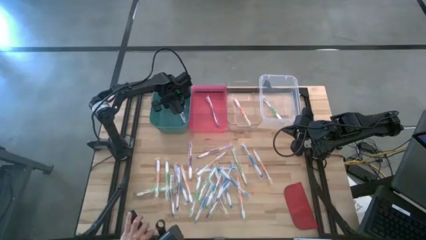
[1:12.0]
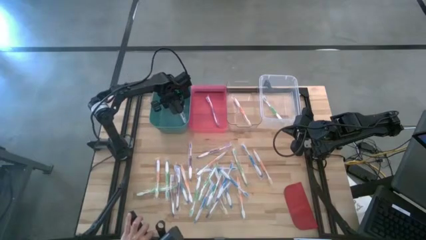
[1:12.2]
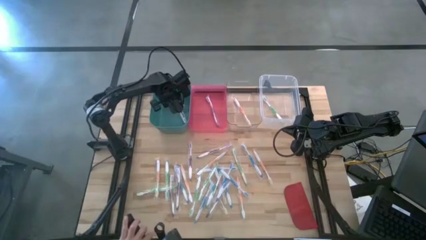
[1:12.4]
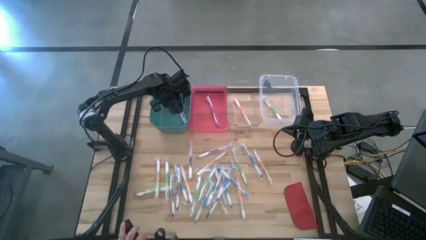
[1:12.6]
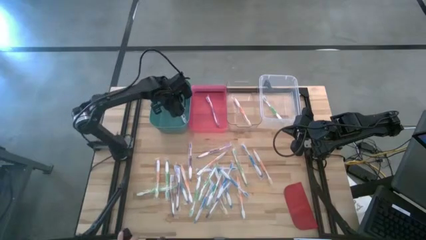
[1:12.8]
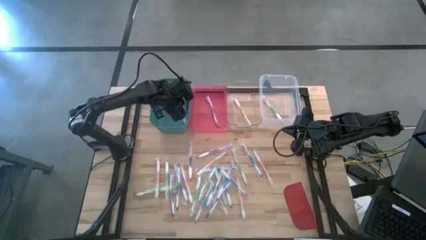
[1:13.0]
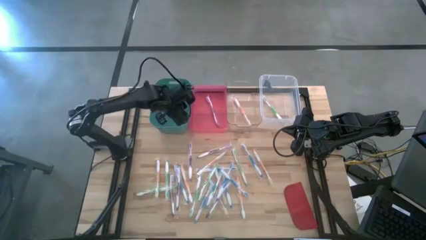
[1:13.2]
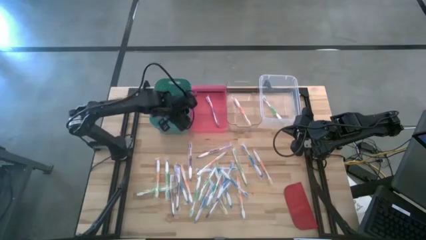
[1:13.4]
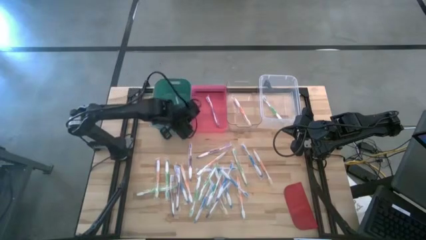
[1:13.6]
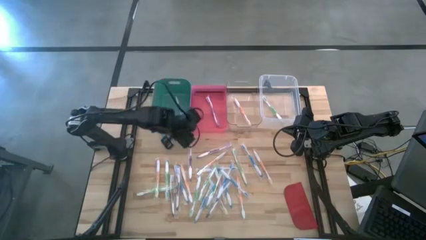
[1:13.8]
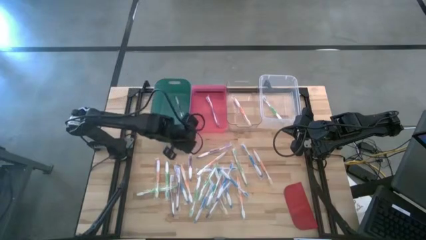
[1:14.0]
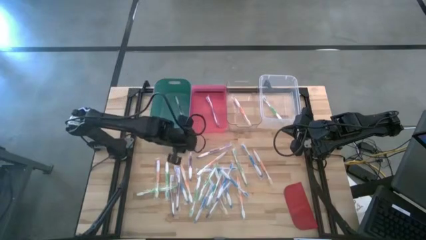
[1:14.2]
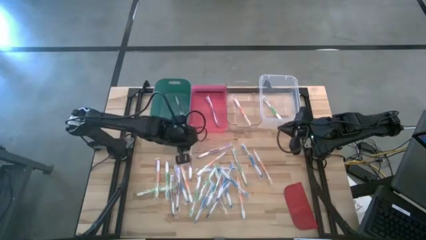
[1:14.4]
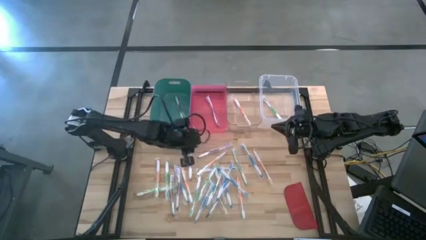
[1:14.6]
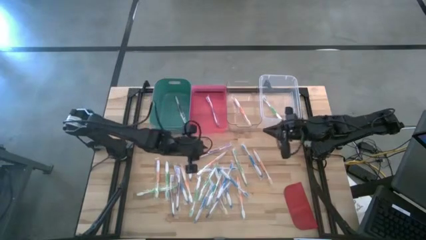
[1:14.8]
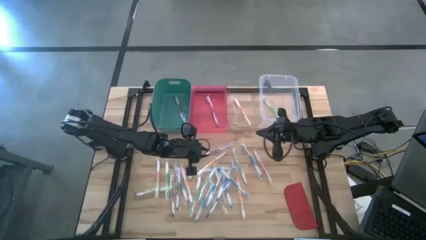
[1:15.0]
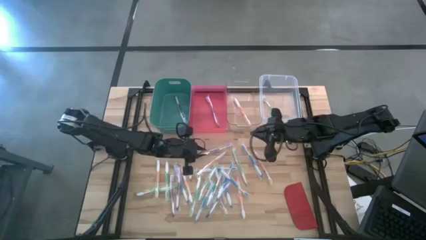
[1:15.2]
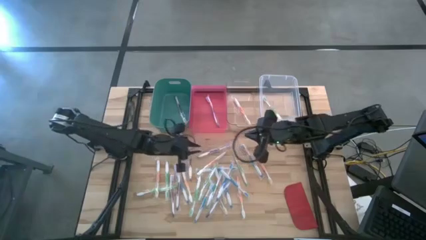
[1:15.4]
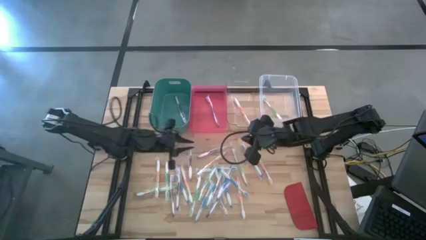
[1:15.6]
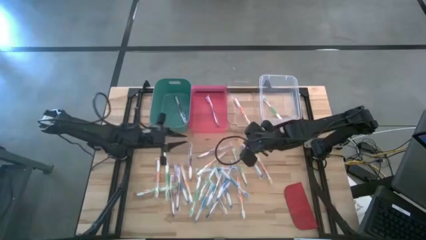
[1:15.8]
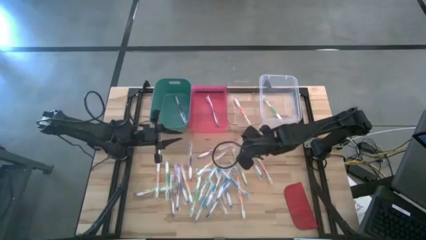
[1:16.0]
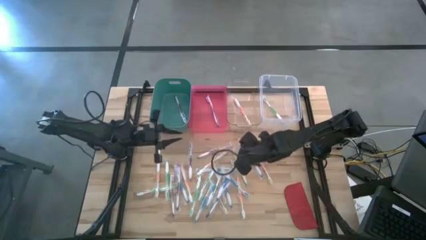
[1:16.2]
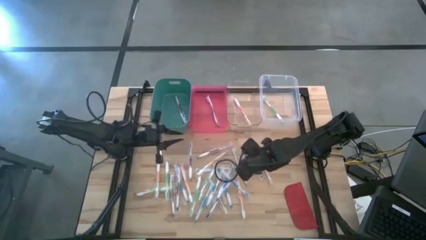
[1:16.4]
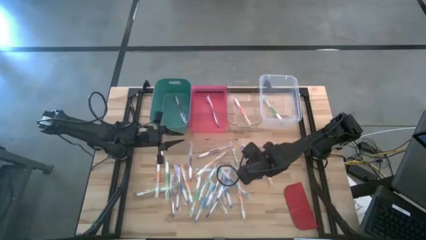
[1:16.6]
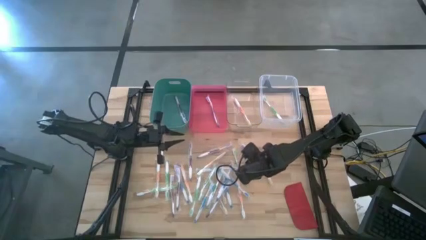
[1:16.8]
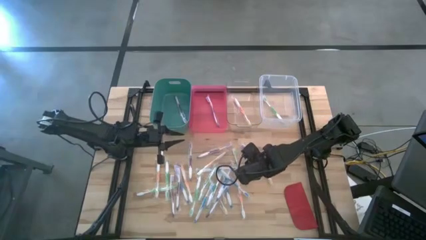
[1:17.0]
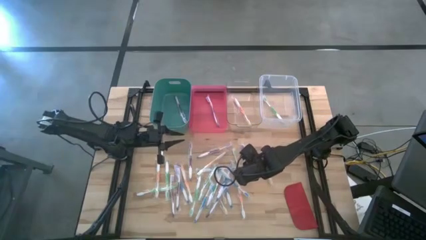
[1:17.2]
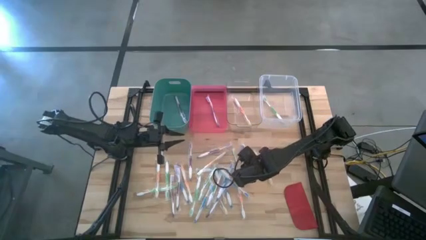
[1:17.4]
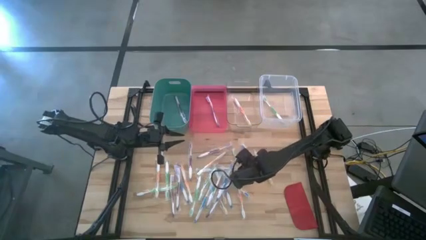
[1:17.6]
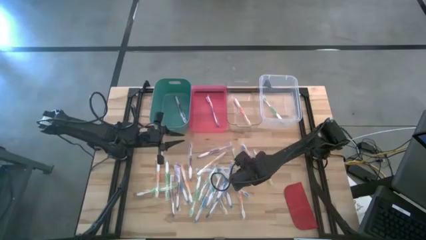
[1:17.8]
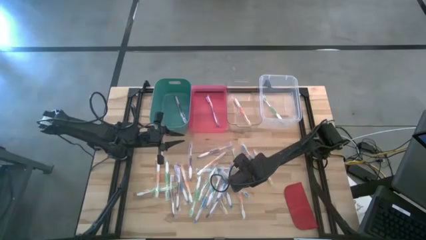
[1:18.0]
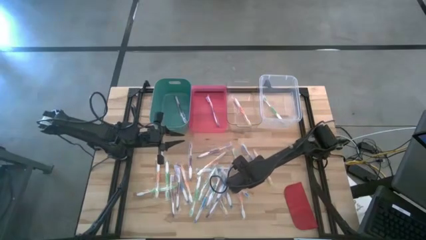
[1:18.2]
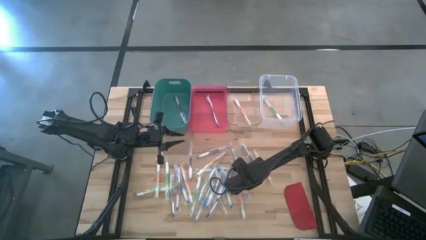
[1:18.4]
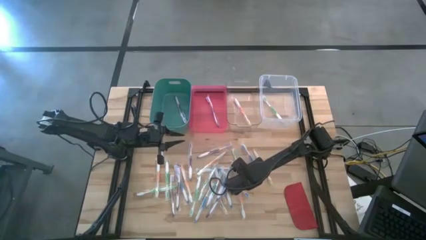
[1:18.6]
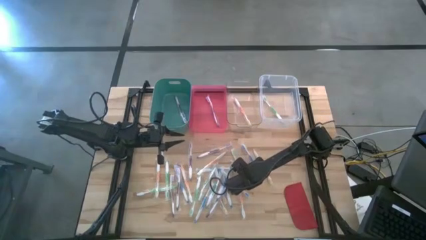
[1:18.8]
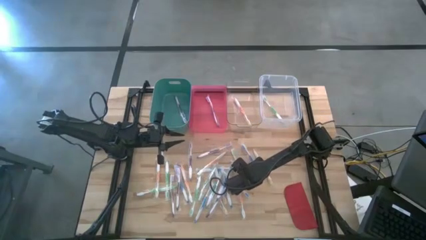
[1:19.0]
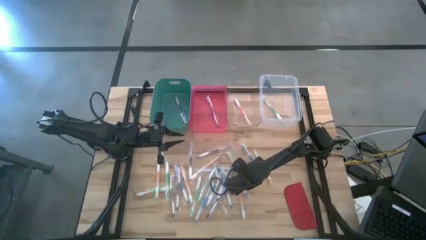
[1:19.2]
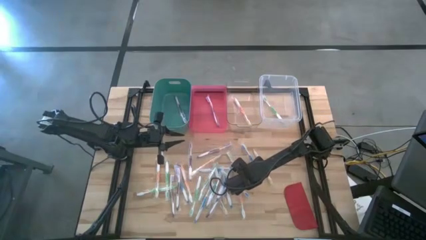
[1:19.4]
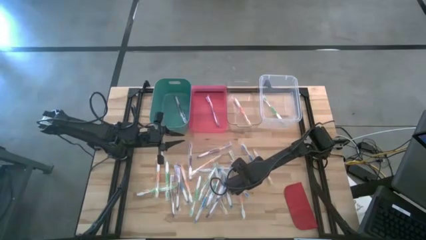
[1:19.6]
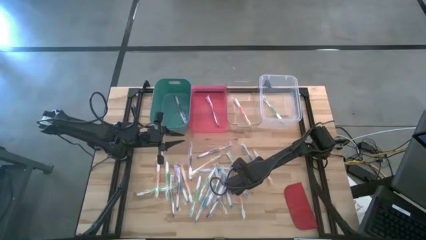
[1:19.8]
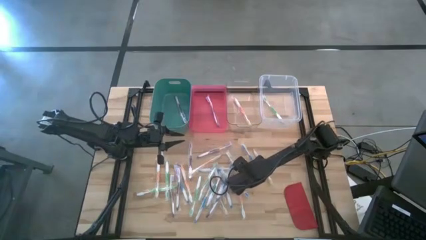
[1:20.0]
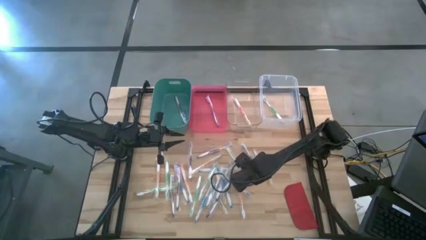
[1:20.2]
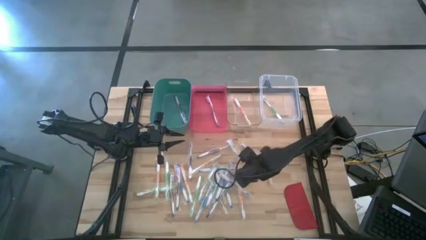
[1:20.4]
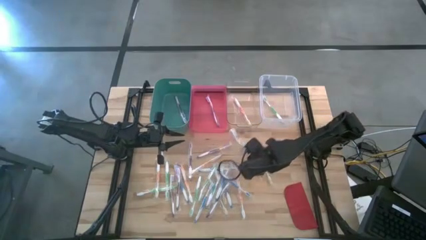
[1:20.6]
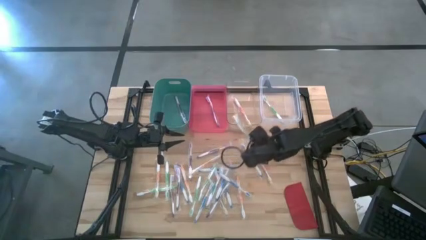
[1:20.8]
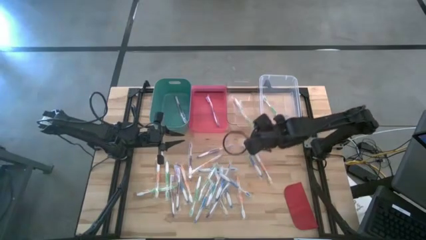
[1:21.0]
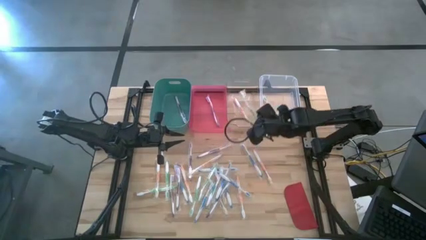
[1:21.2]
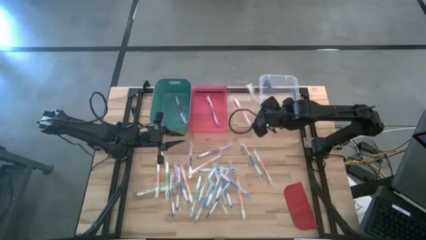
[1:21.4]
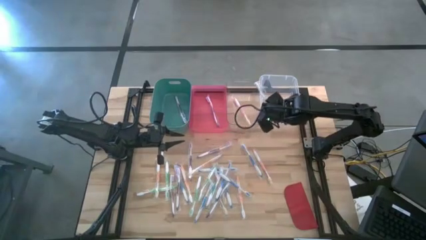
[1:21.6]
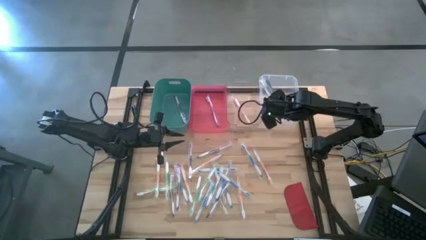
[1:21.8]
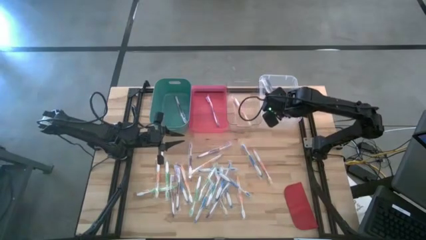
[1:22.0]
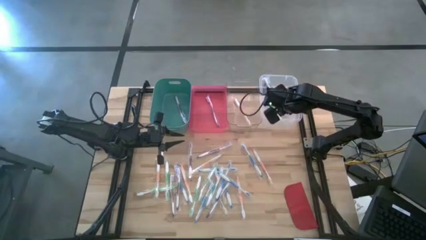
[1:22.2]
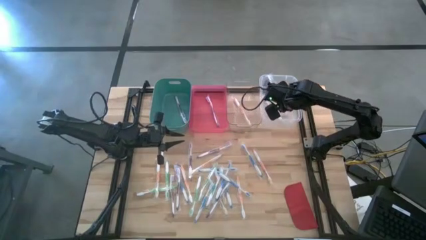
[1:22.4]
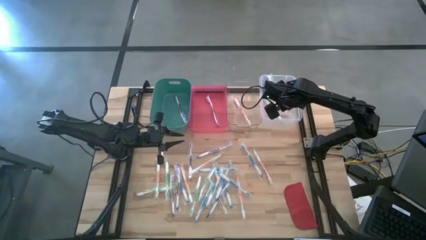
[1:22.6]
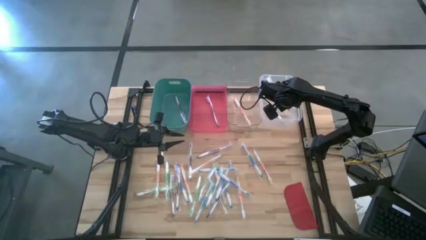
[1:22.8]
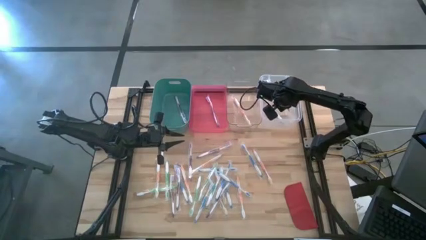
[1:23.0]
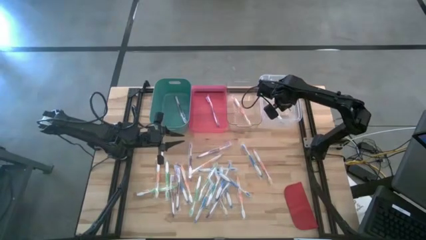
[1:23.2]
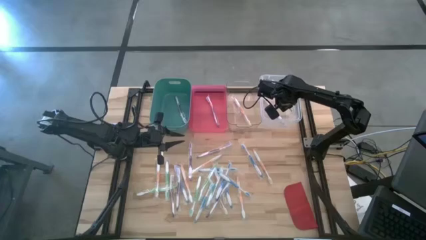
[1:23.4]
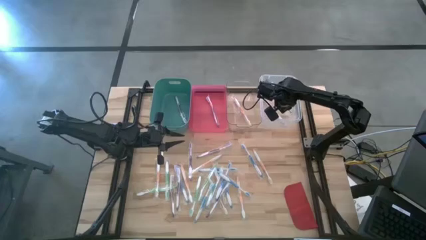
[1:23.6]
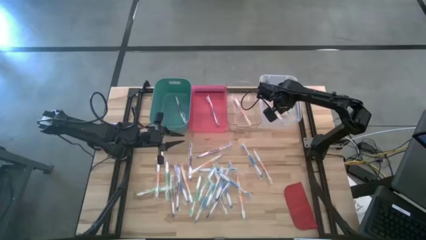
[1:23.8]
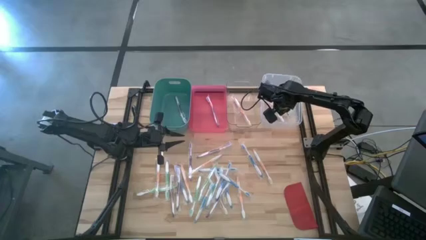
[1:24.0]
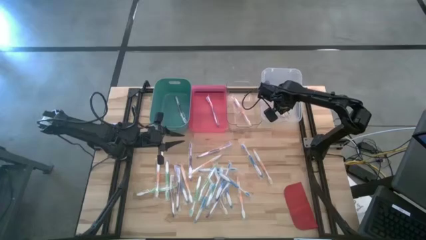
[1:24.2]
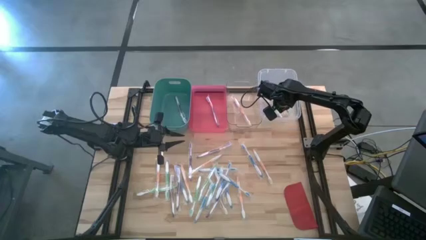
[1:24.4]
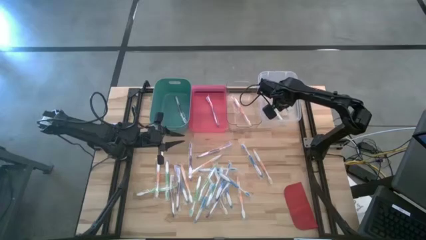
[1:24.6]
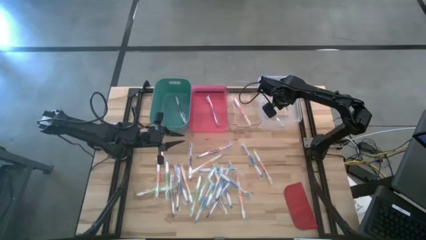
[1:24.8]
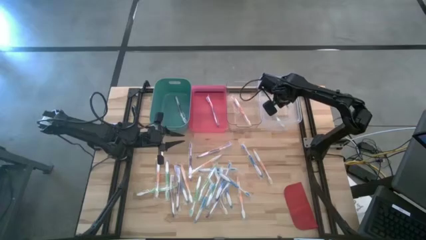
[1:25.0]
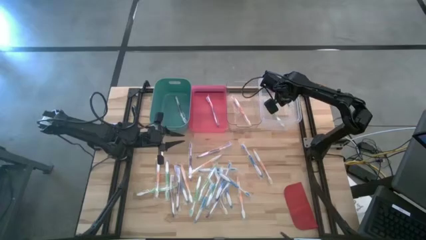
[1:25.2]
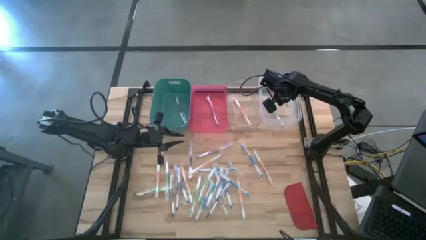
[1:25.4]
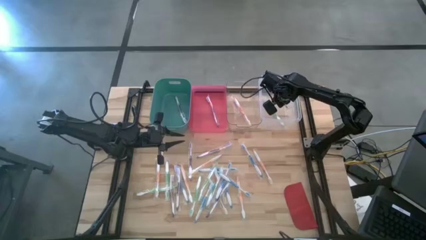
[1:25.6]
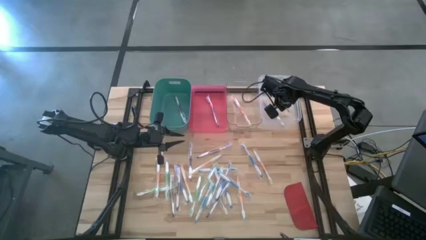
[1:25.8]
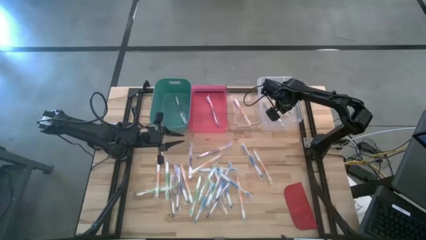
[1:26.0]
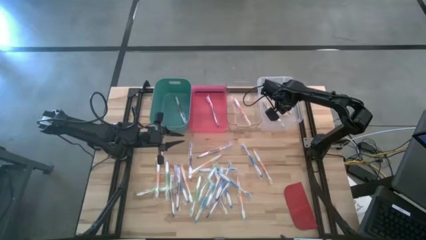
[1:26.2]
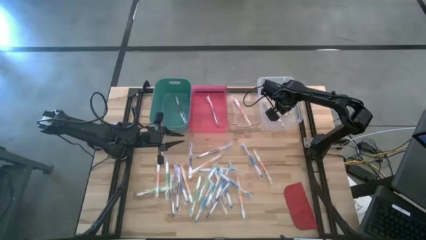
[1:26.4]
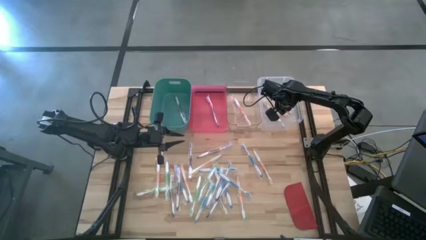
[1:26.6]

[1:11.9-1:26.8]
Task: Pick & Place Toothbrushes
Put the green toothbrush into the white bin

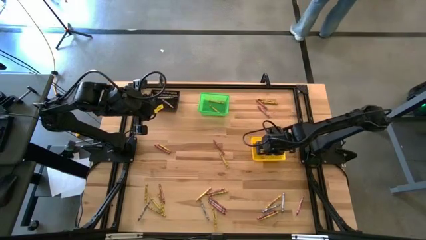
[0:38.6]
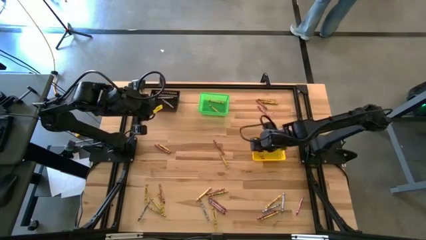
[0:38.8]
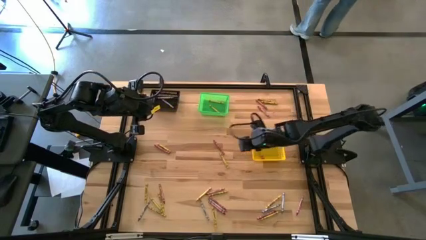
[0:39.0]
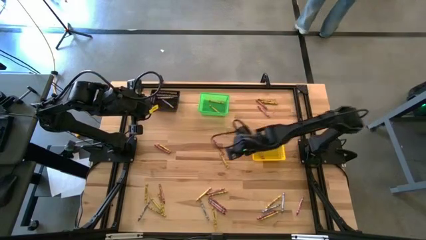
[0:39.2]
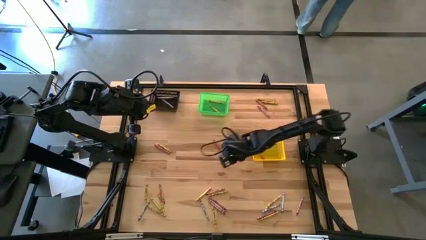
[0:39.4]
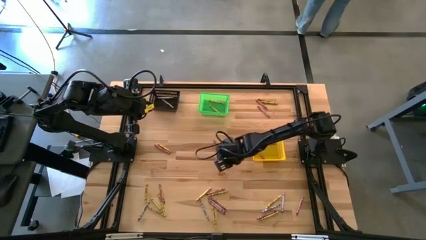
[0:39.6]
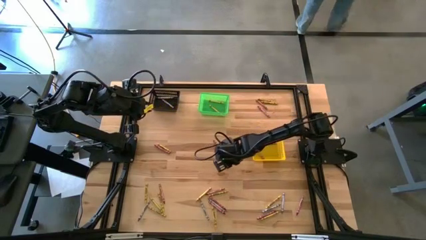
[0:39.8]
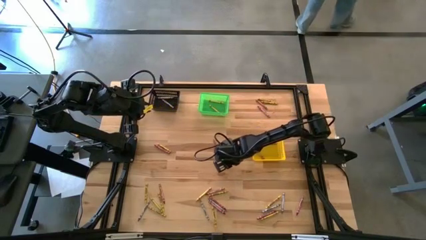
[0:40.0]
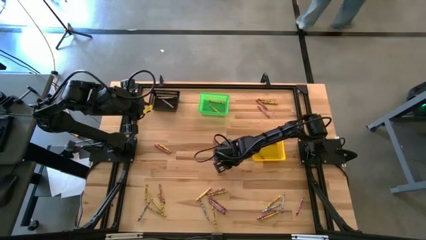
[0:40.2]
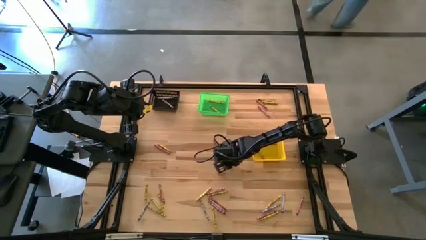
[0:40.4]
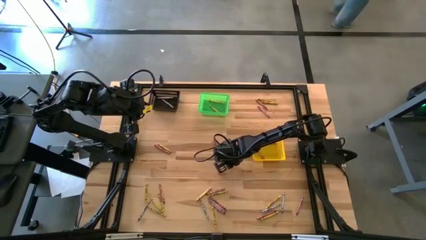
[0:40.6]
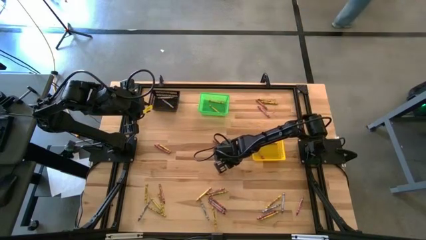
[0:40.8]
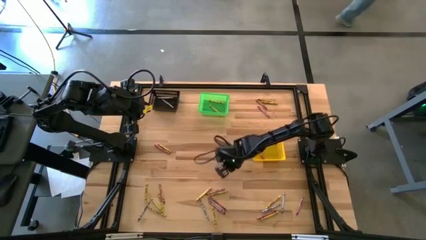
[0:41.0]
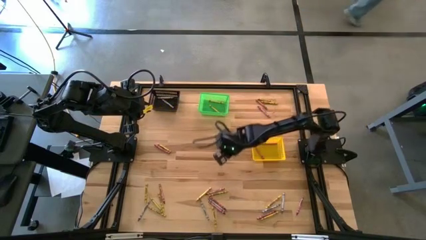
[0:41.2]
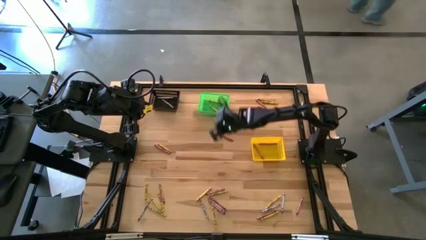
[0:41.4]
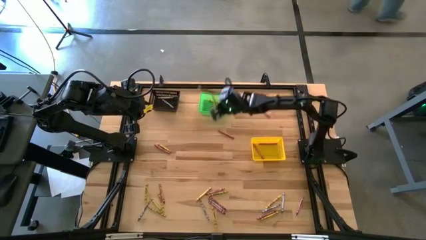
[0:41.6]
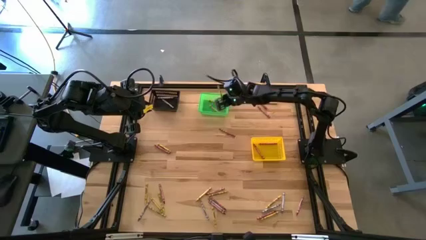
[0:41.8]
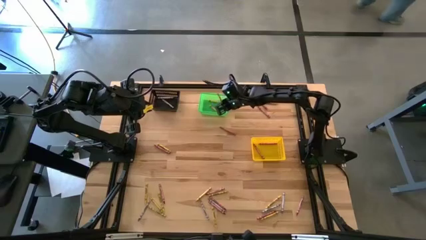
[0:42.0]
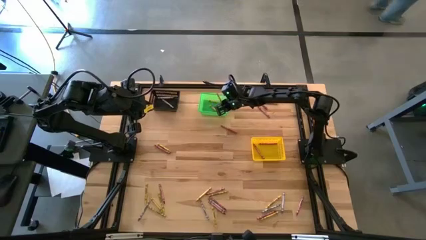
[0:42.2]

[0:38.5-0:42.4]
Task: Sort crayons
Put the yellow crayon into the green basket
